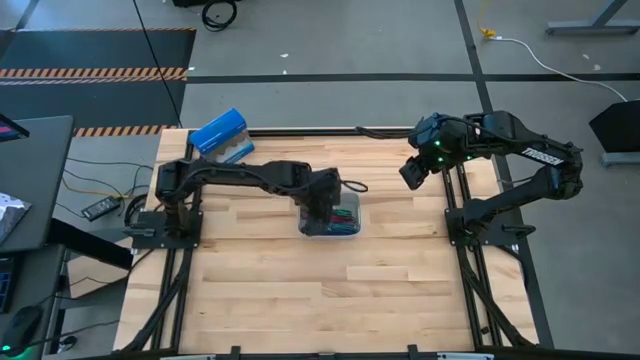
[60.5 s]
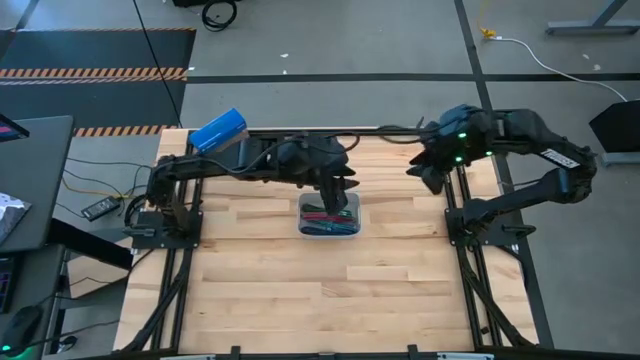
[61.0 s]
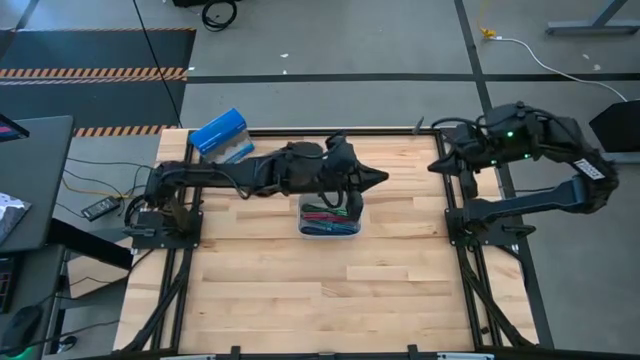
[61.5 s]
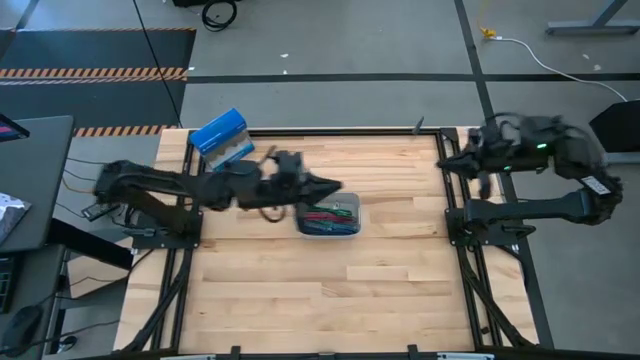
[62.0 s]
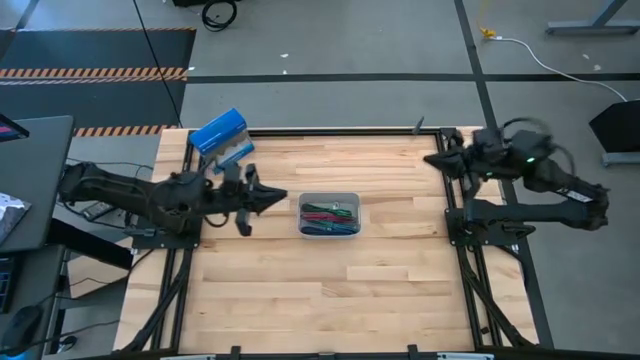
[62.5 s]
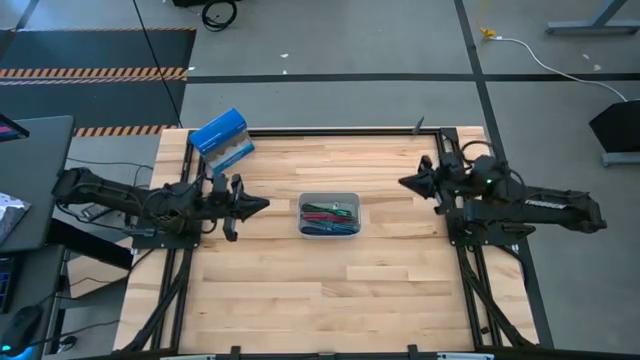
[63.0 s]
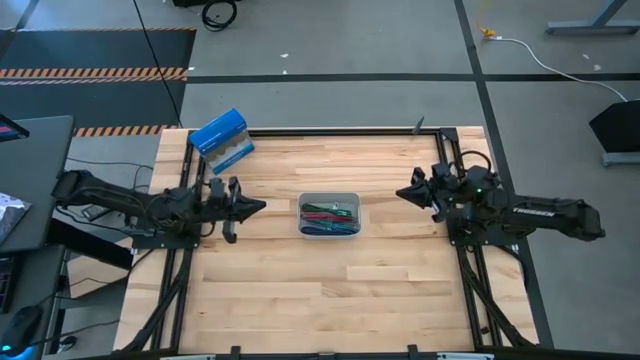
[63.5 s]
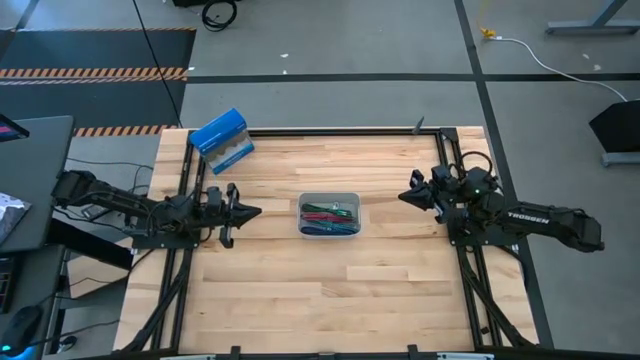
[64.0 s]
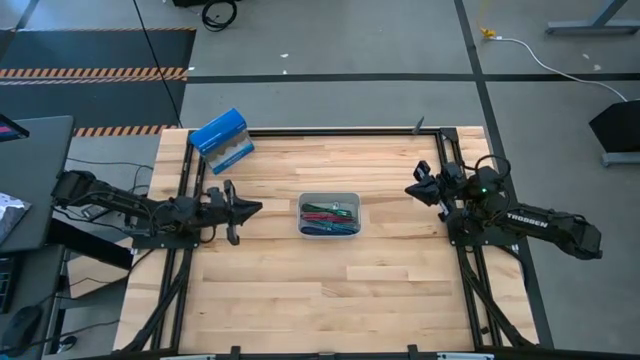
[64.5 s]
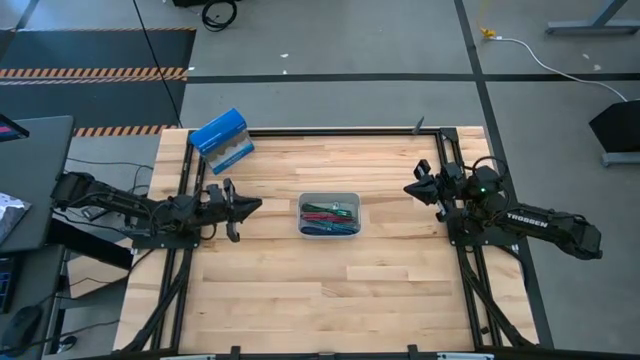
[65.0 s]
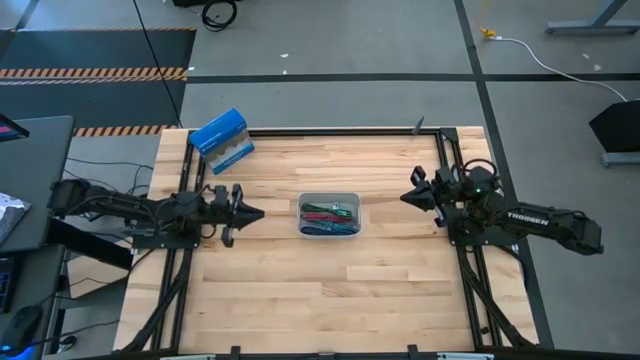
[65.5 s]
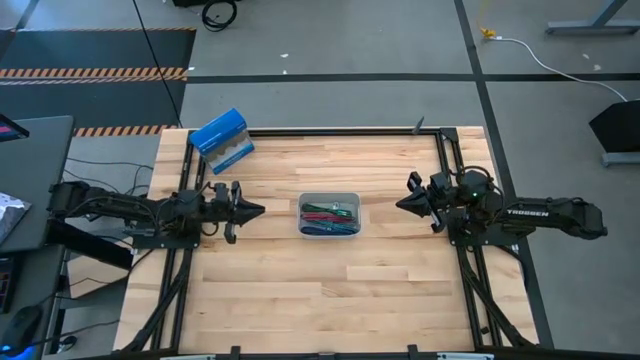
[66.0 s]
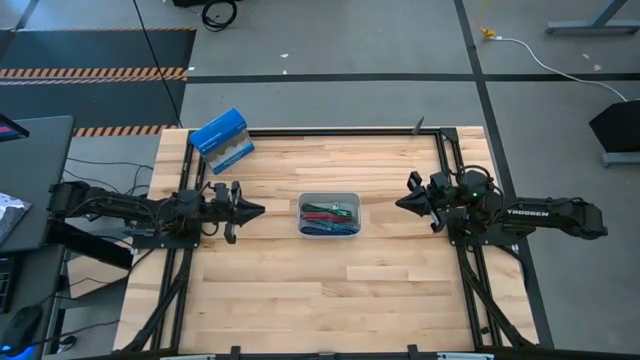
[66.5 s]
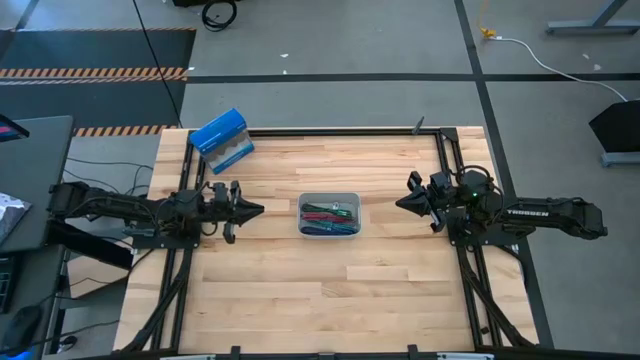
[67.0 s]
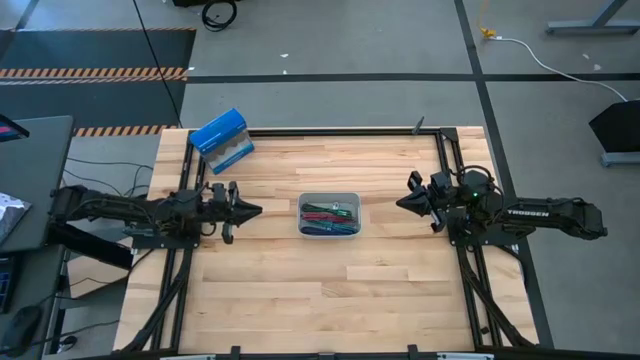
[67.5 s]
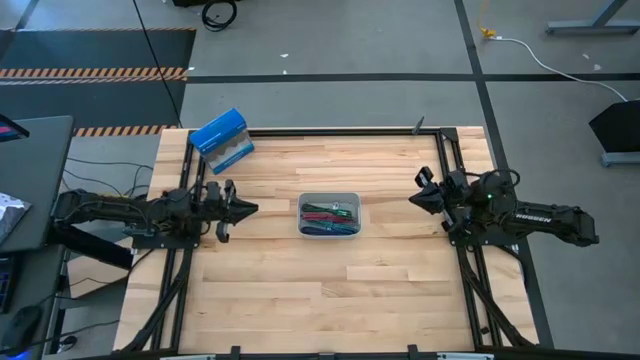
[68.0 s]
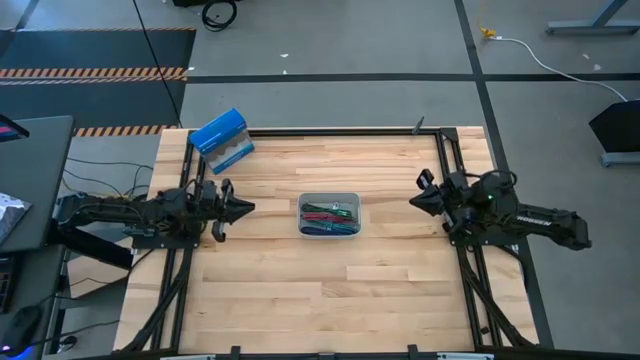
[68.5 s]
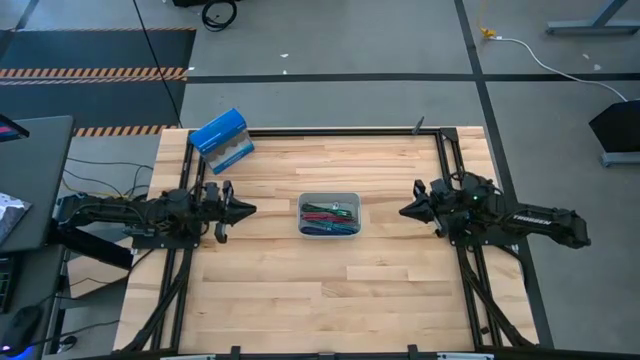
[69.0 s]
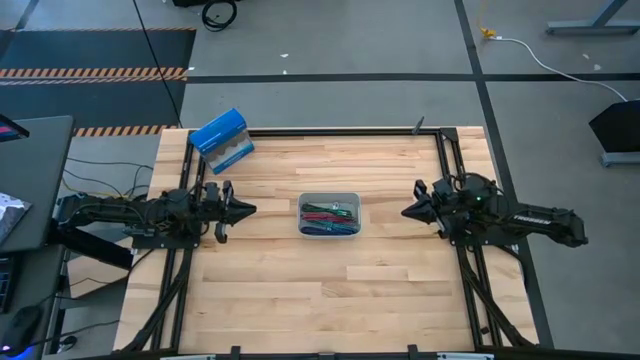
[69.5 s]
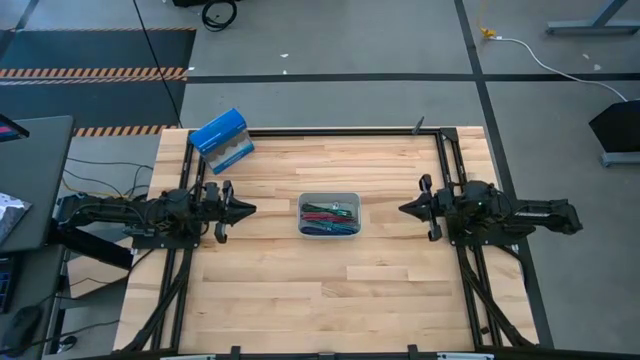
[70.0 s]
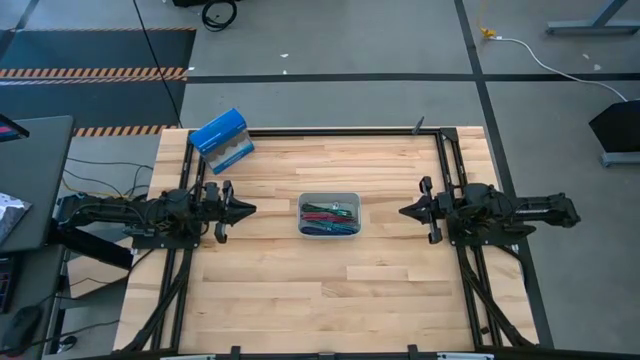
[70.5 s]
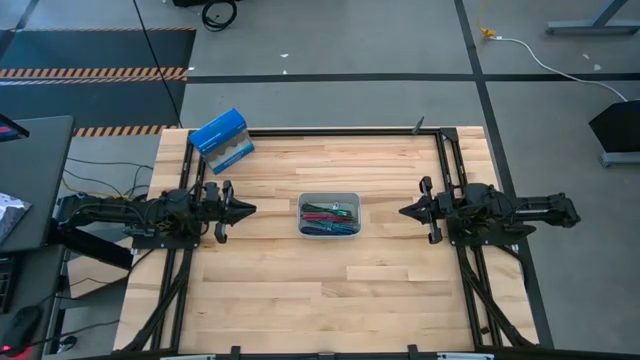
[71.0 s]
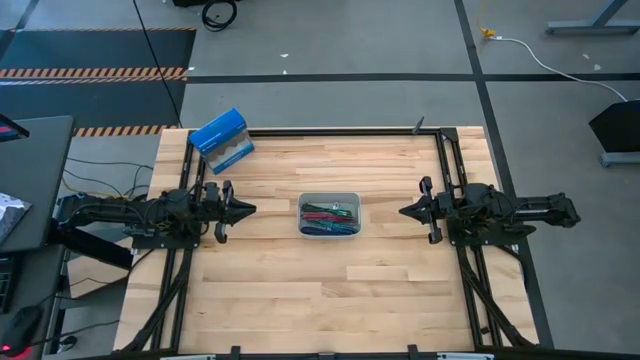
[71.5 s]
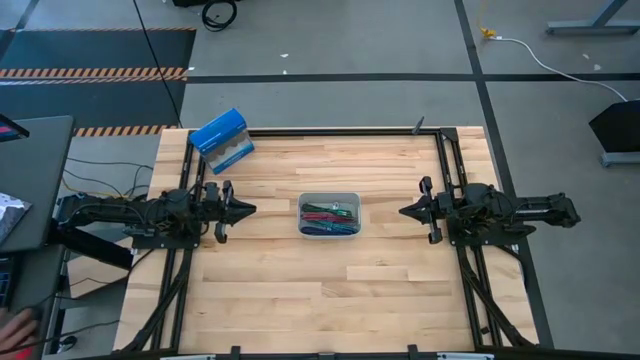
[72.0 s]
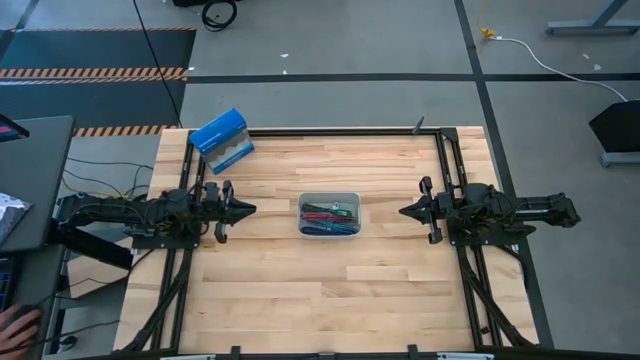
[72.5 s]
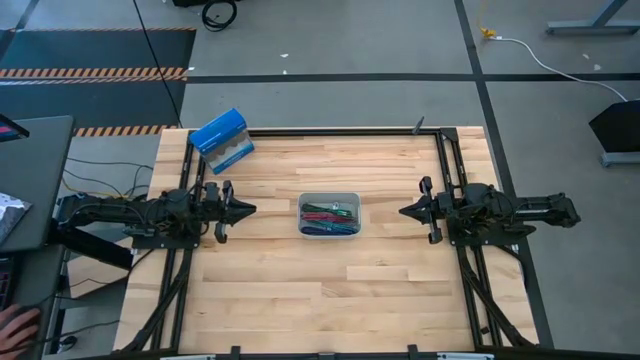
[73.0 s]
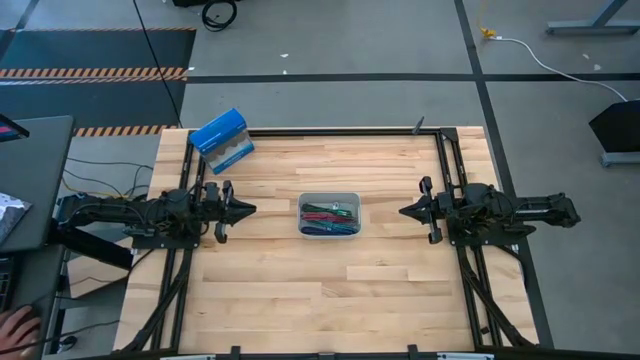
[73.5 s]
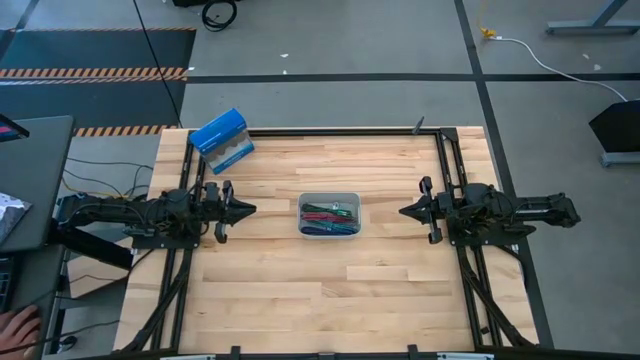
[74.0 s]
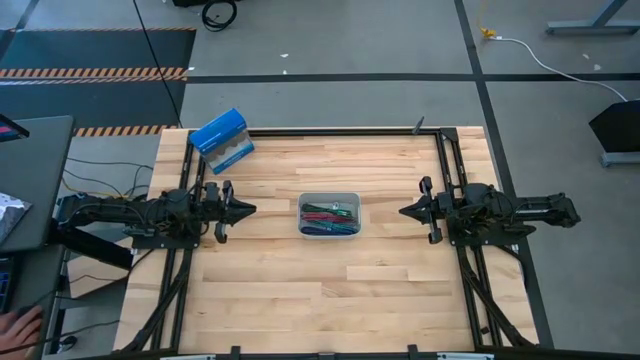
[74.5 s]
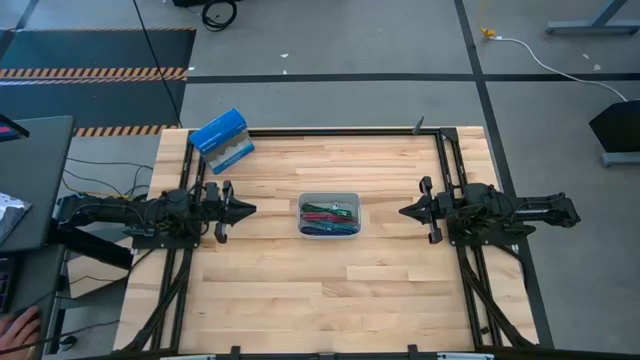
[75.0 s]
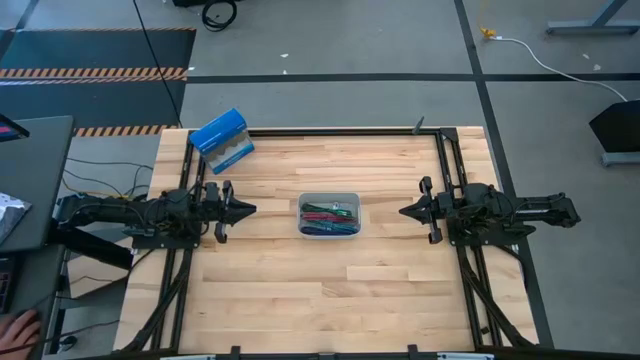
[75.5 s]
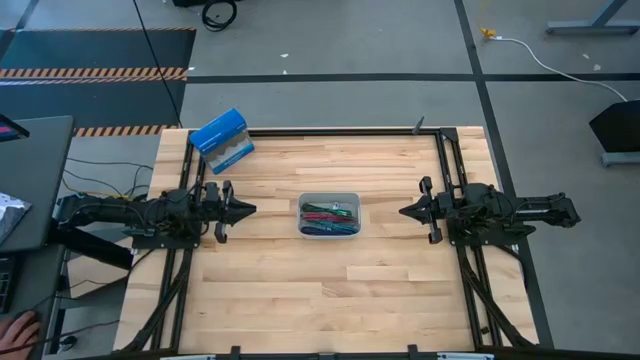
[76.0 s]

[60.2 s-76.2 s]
Task: Pick and place USB-C Cables
Return to Home Position

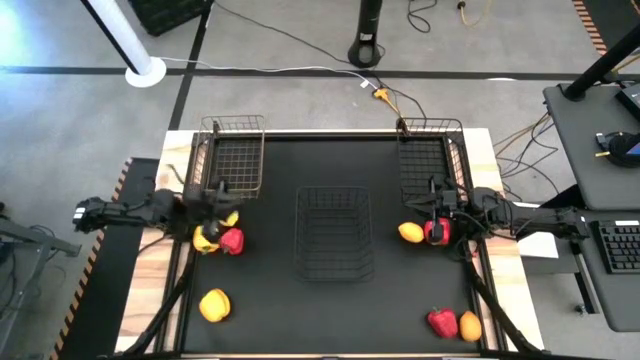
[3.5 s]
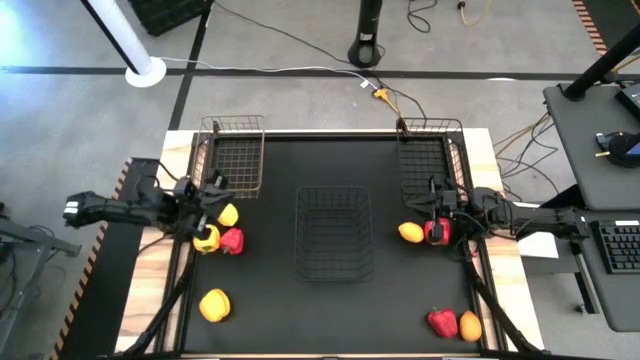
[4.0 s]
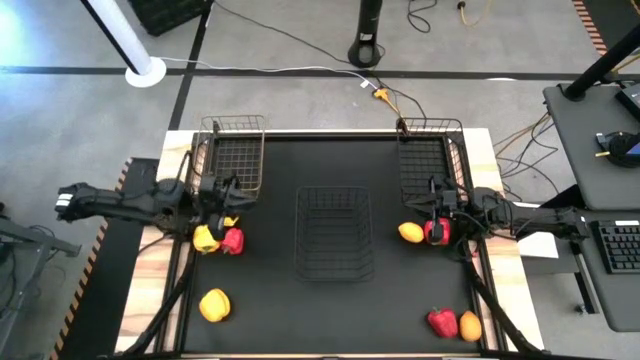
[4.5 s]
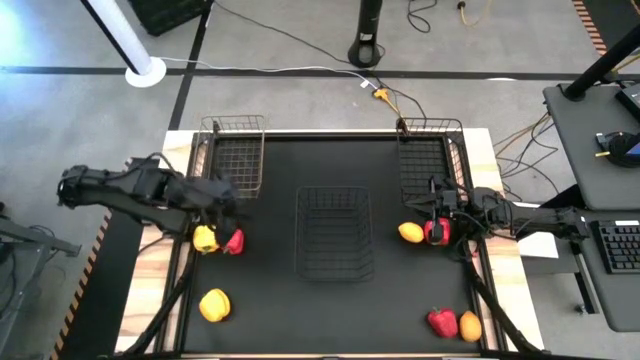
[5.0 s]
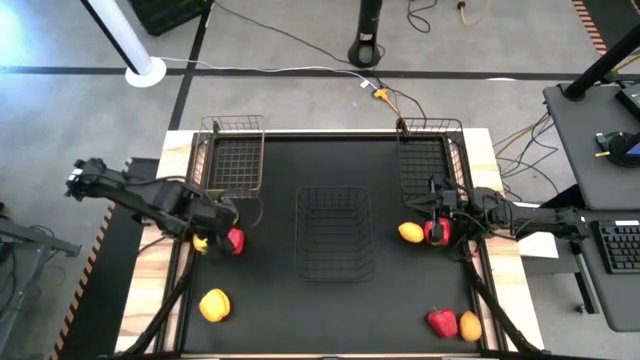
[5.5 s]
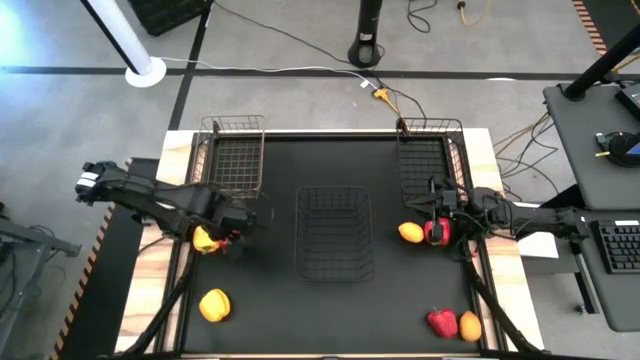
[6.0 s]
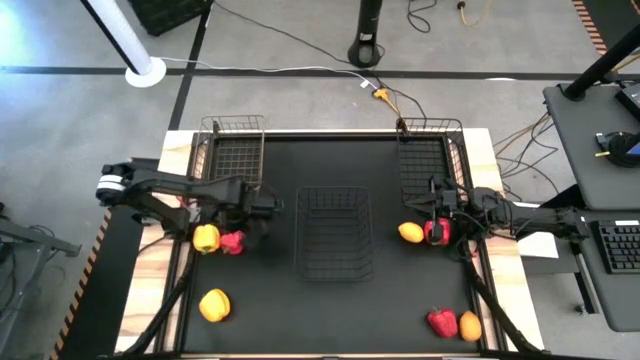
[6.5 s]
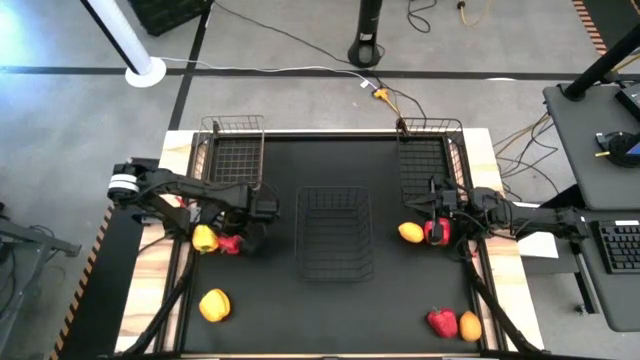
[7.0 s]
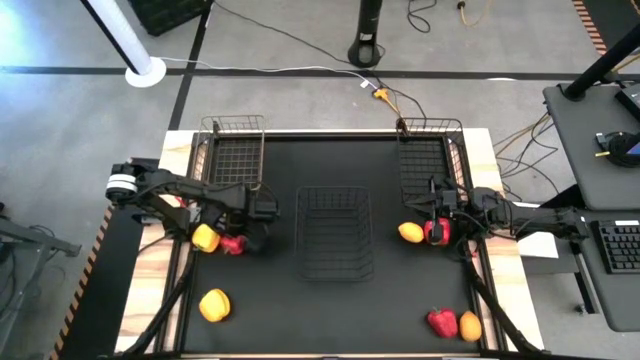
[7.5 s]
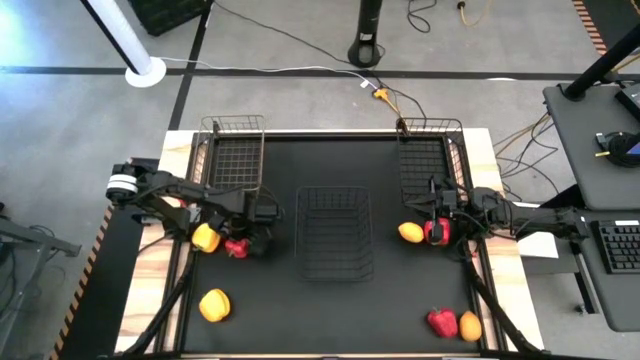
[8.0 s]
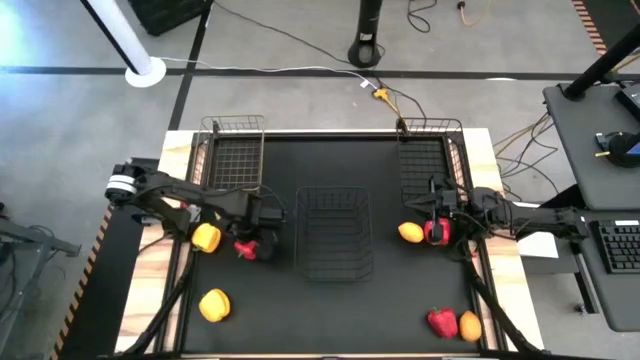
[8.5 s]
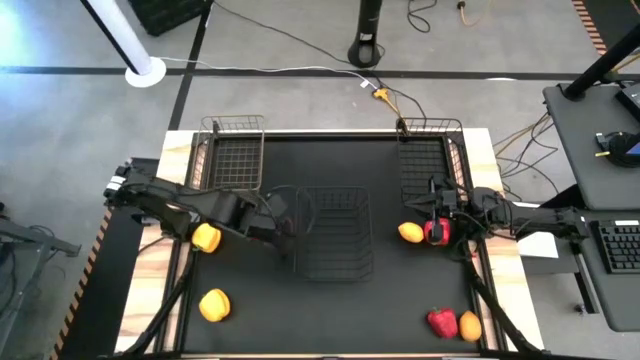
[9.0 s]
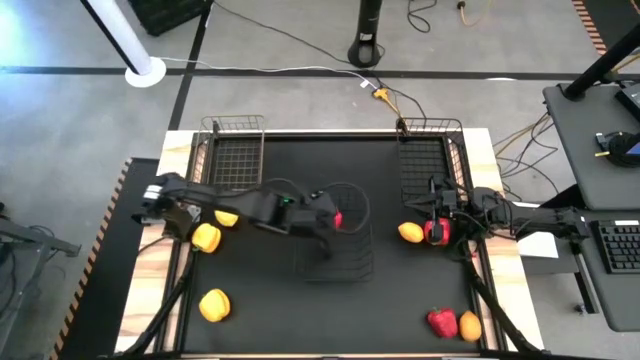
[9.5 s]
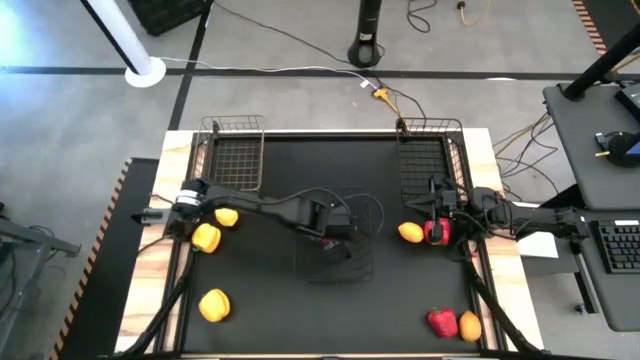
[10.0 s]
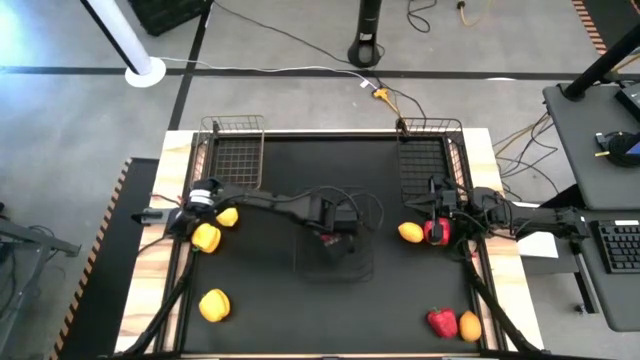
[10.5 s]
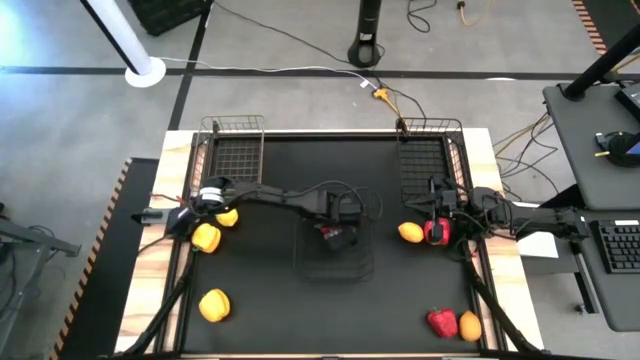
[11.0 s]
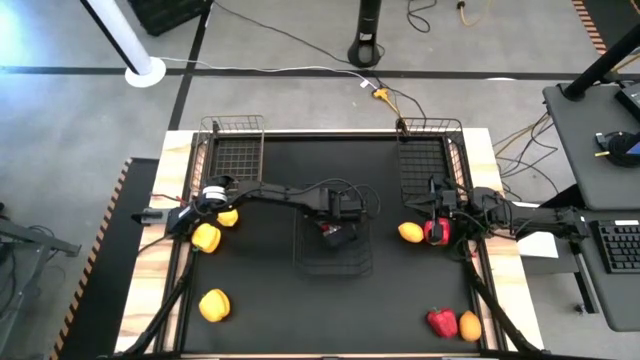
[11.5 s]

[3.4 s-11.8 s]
Task: Sort produce into baskets
Put the left red bell pepper into the bottom wire basket
